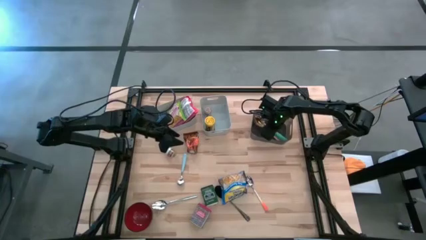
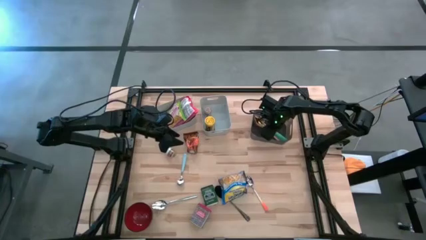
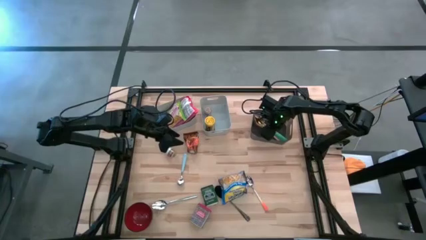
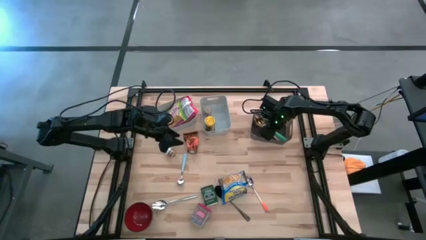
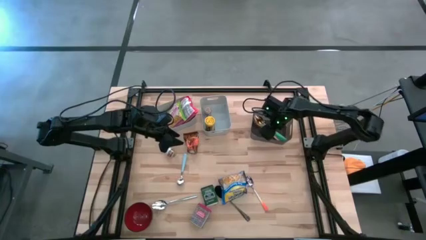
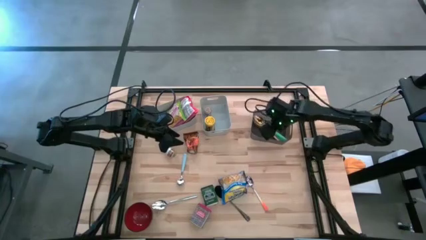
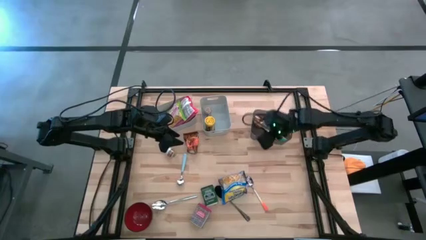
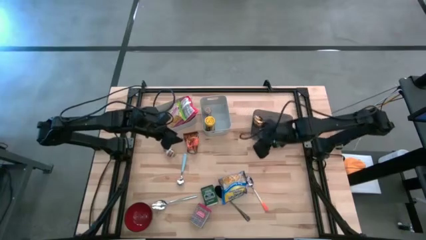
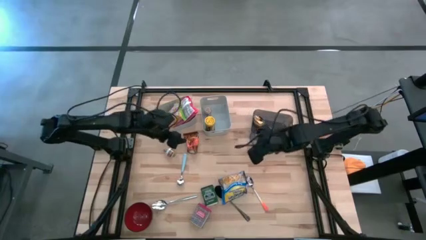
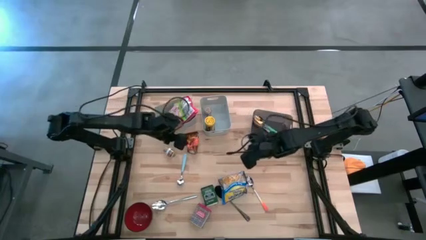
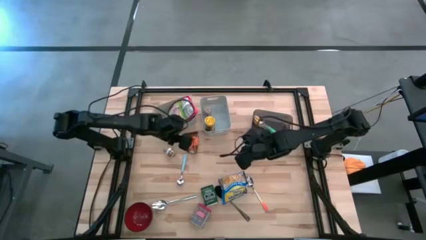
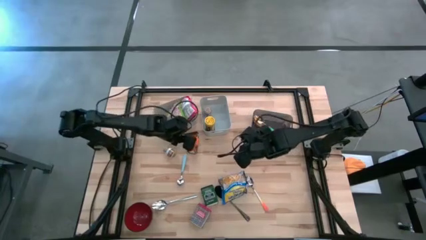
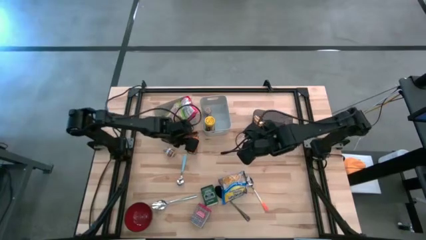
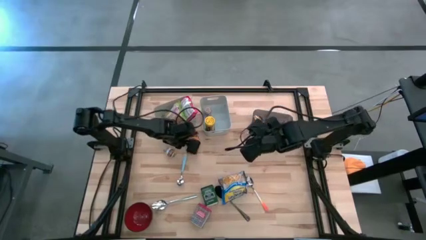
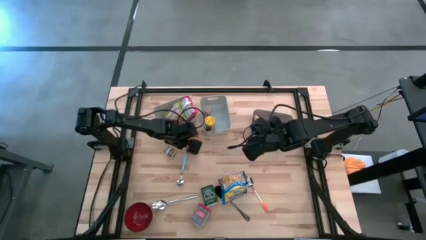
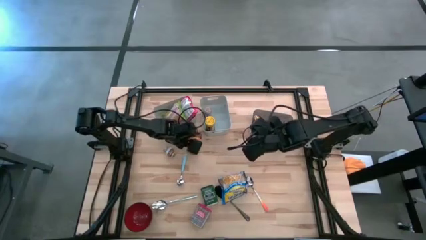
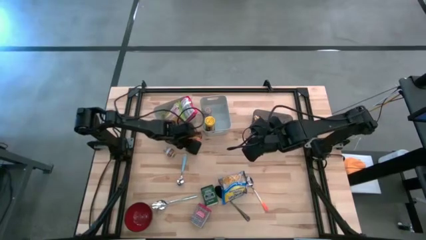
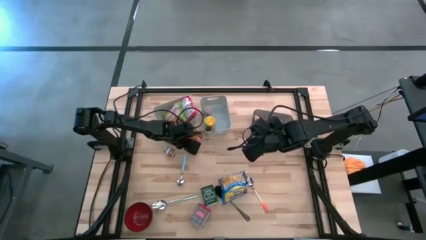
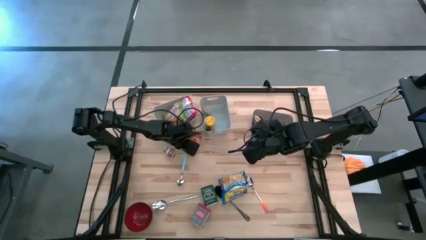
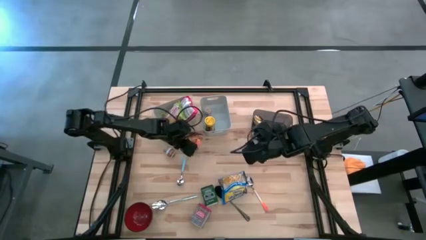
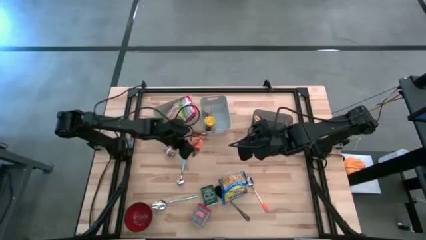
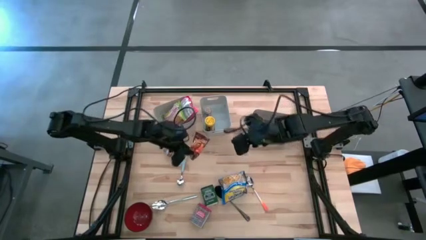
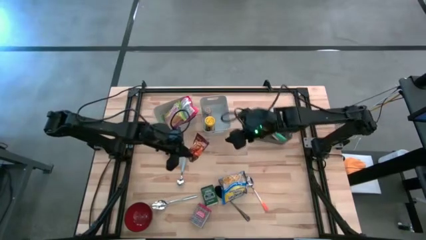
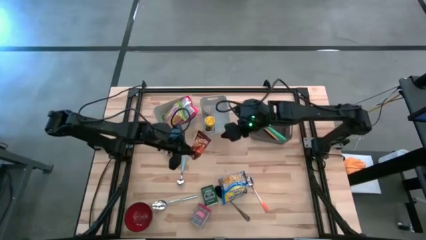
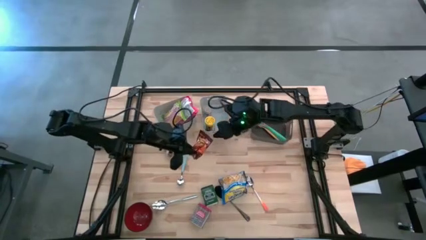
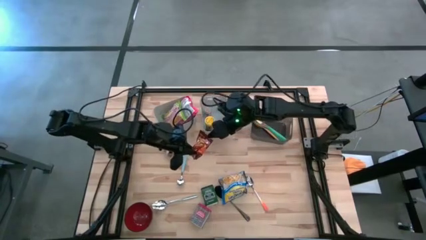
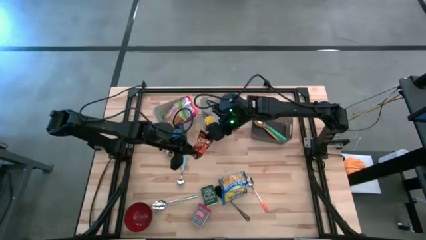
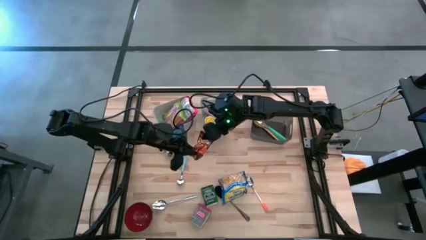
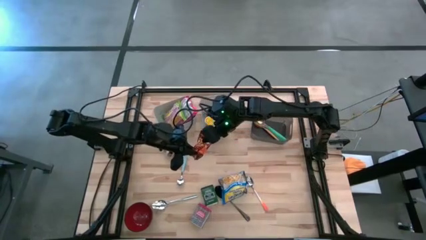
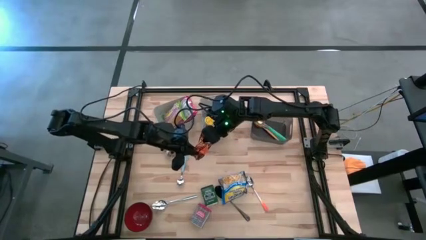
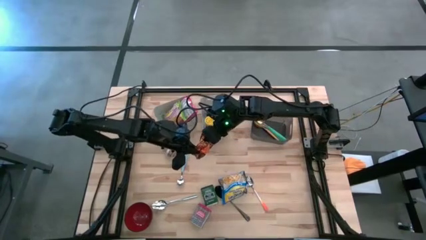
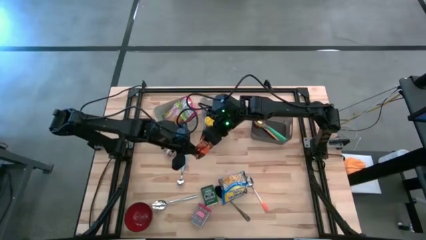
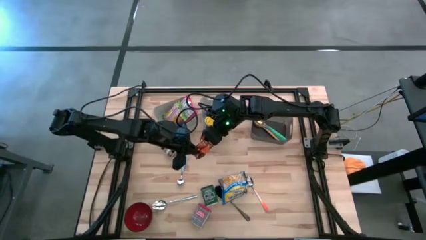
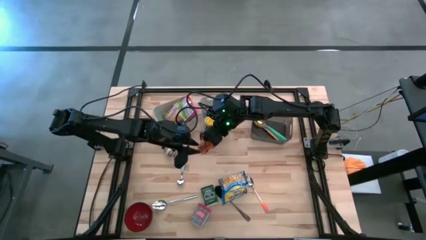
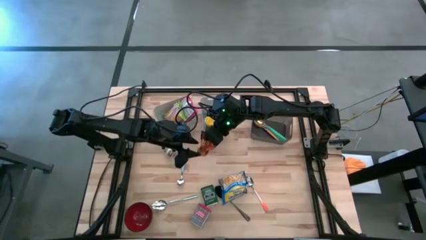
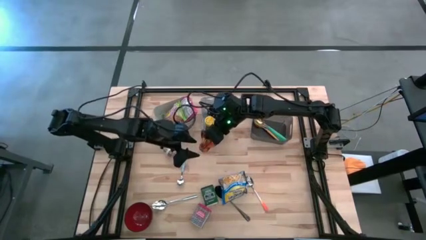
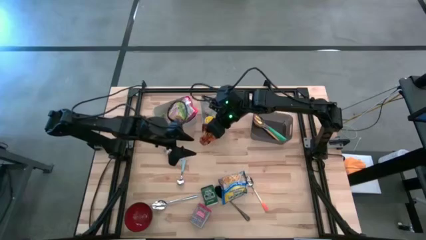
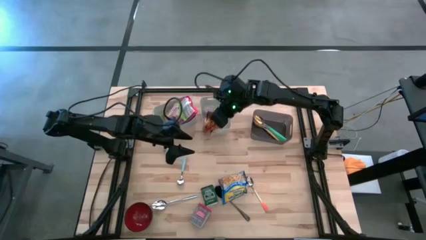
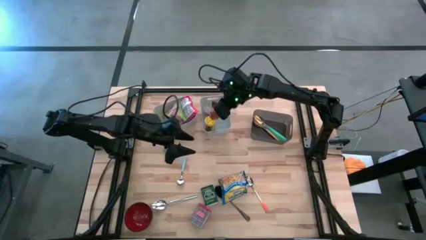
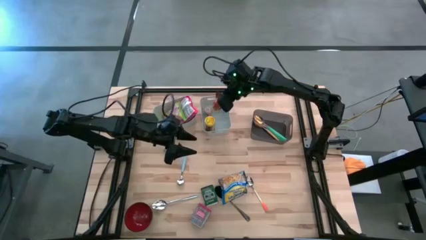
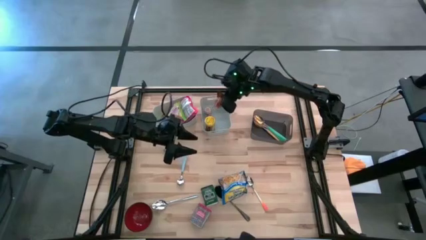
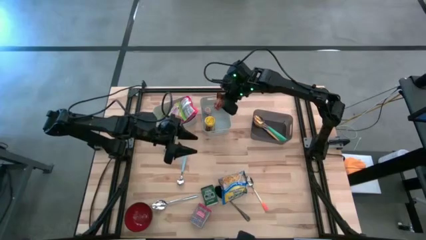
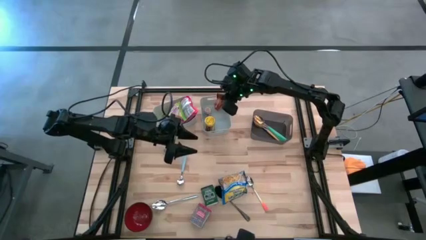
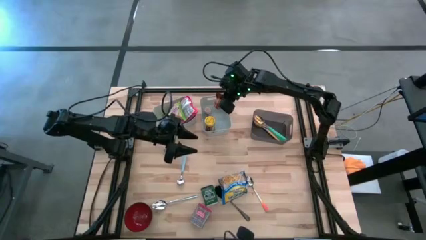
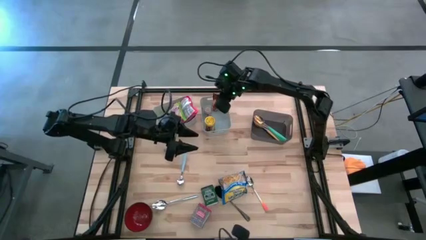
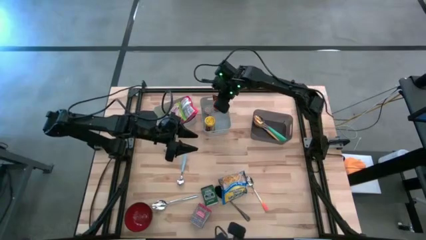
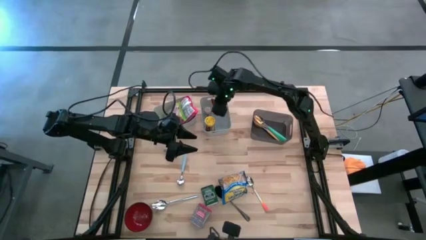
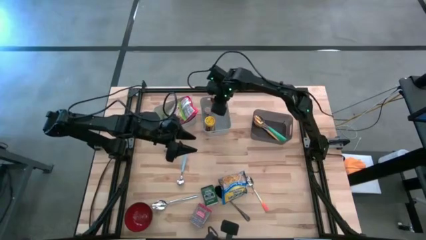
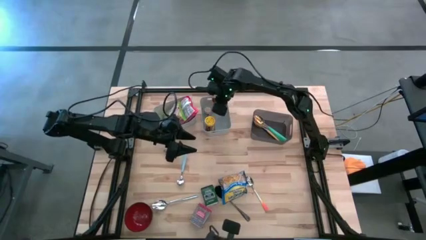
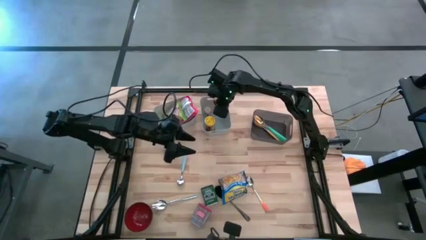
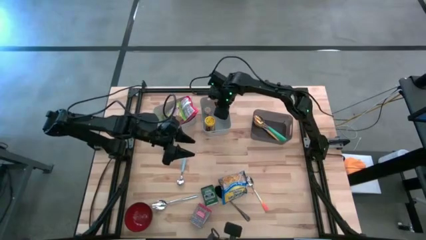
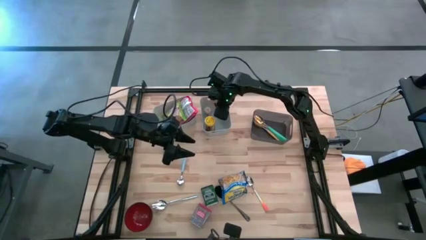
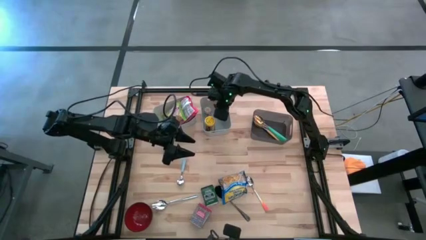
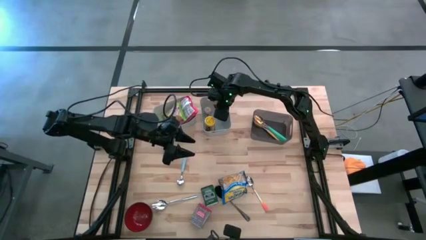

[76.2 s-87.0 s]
Put the orange seasoning pack into the right gray bin

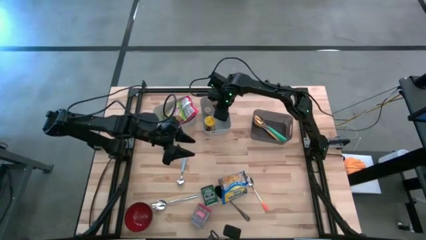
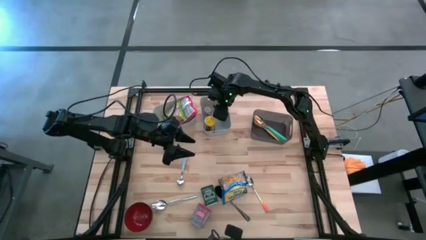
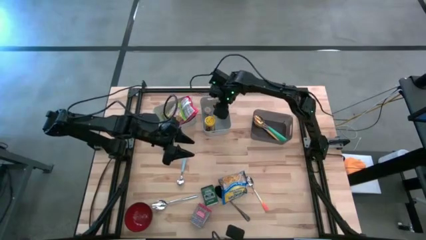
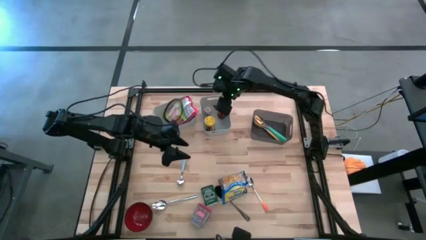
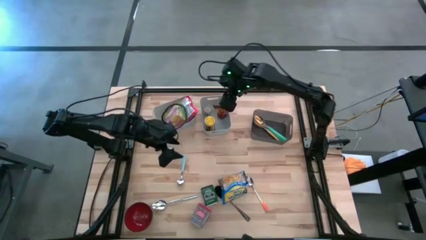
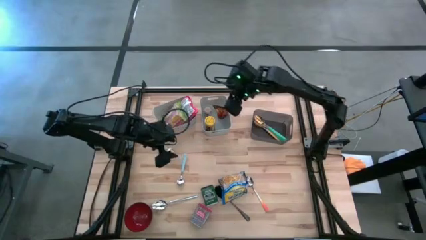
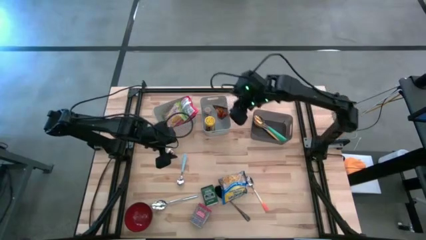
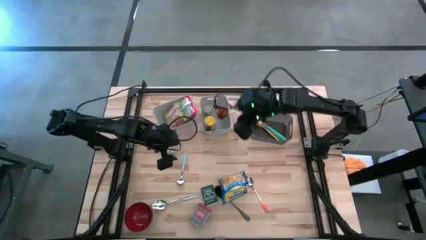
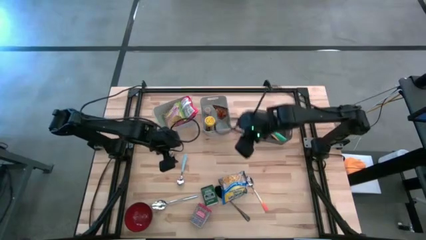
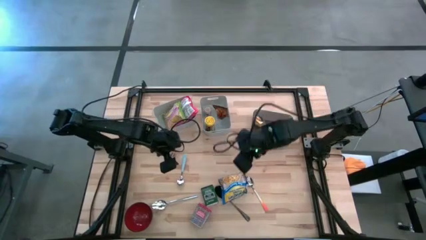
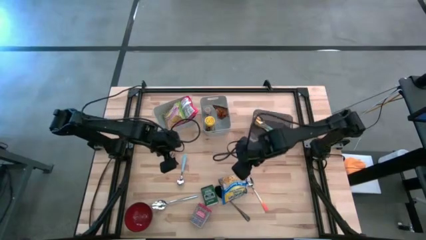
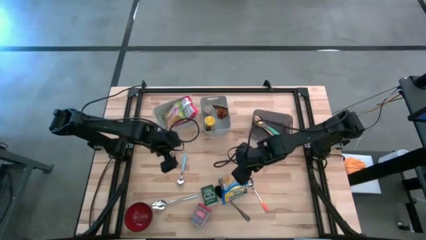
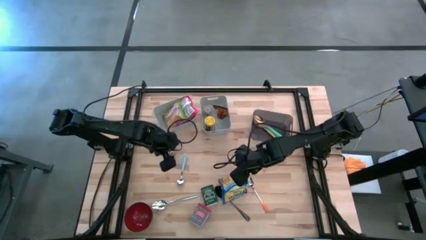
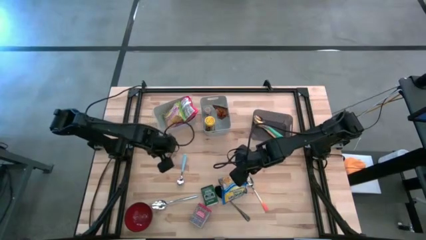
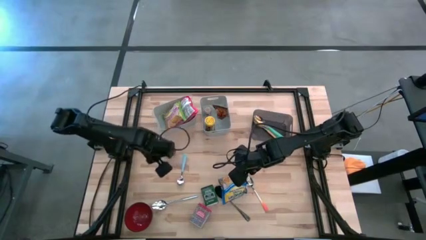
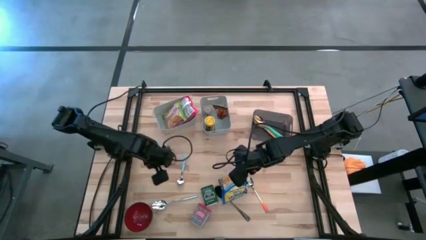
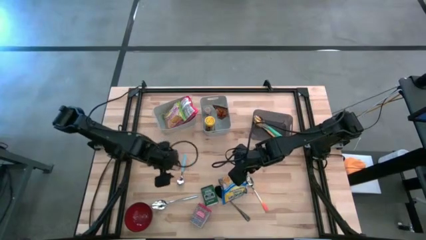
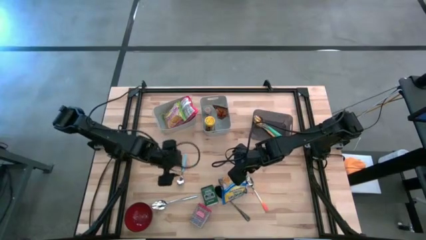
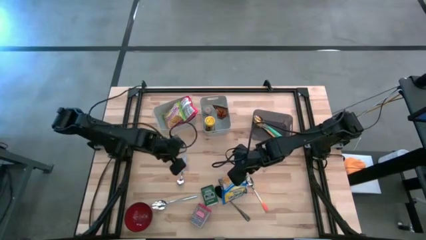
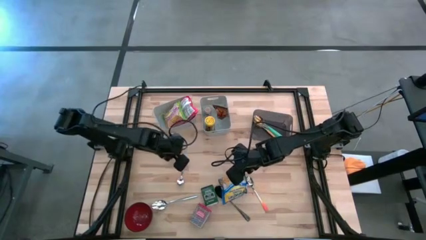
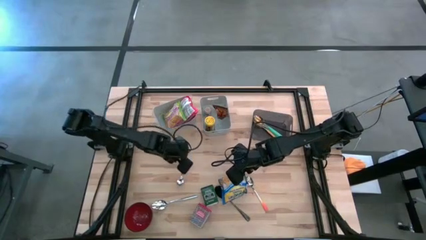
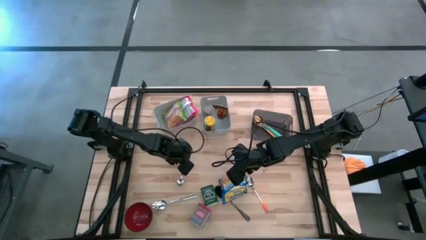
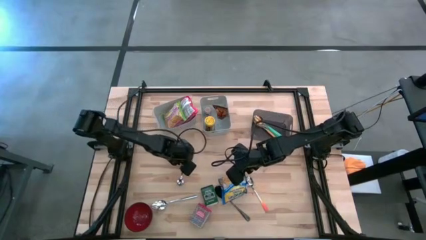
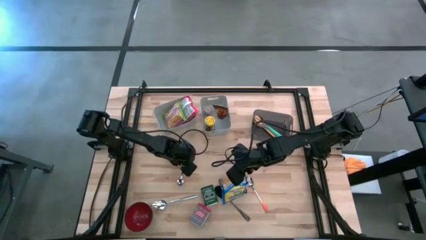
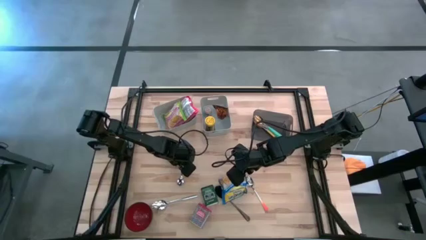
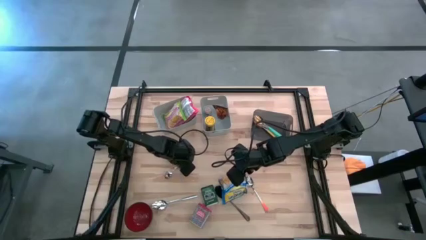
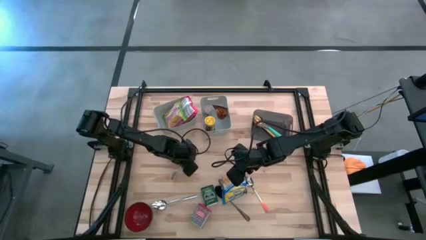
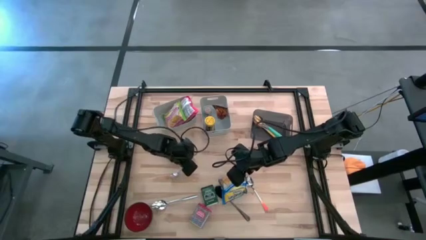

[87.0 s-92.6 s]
Put the light blue spoon into the black bin
